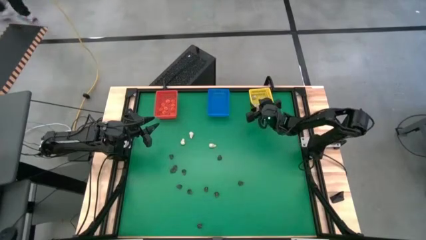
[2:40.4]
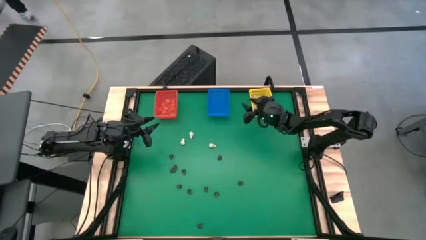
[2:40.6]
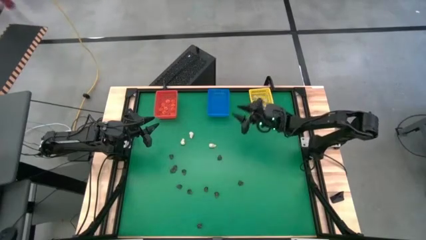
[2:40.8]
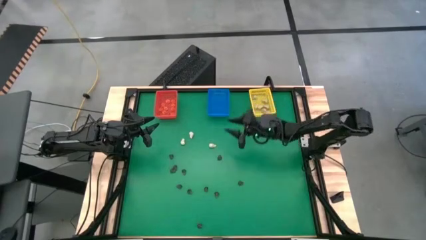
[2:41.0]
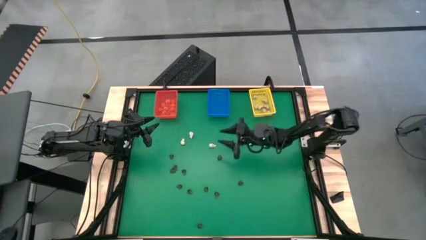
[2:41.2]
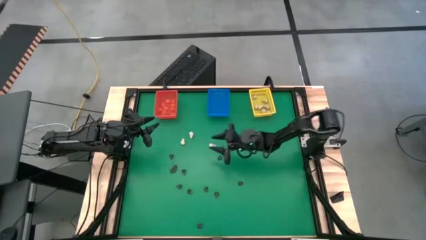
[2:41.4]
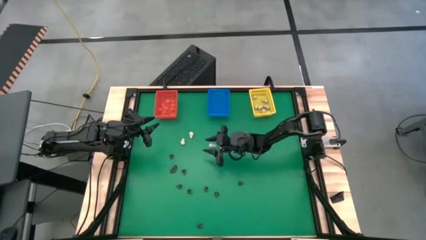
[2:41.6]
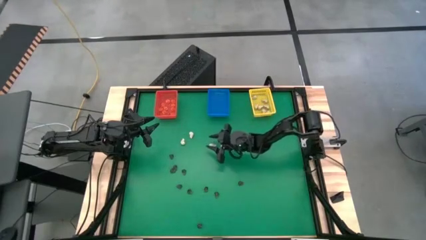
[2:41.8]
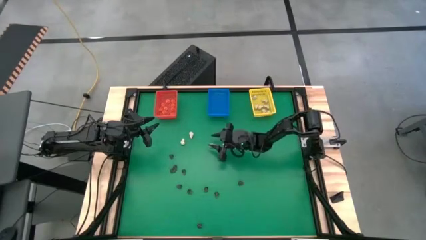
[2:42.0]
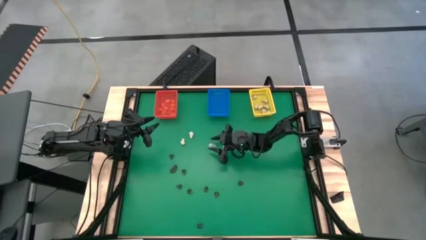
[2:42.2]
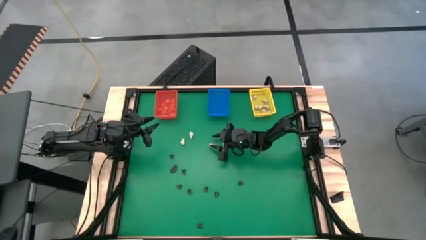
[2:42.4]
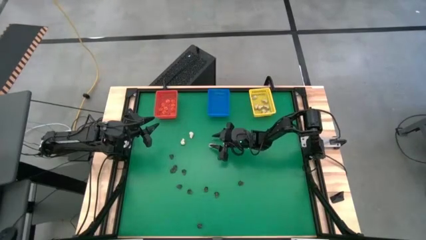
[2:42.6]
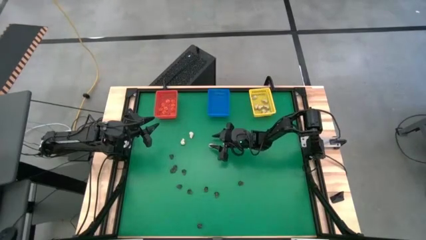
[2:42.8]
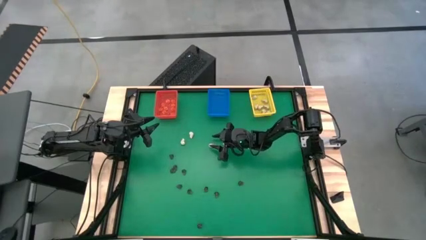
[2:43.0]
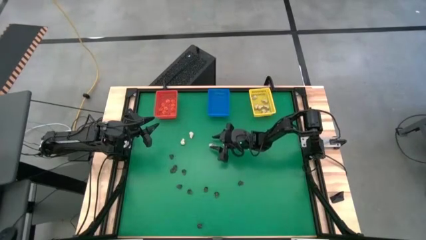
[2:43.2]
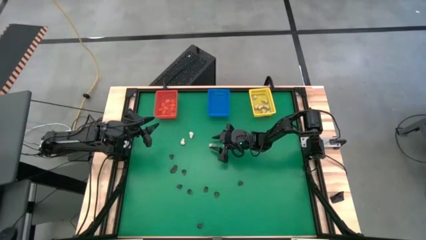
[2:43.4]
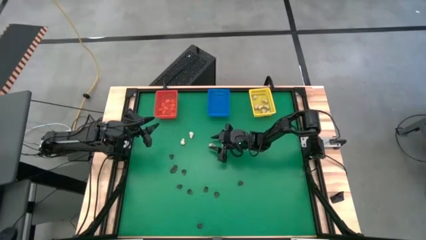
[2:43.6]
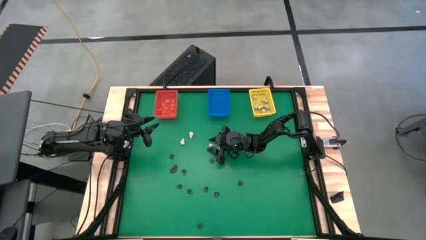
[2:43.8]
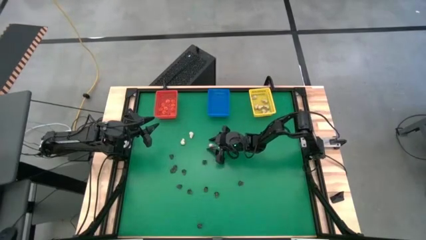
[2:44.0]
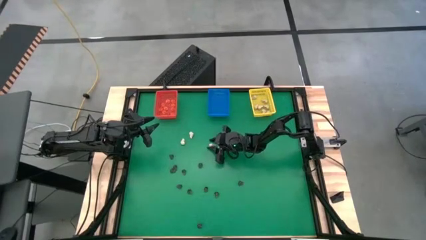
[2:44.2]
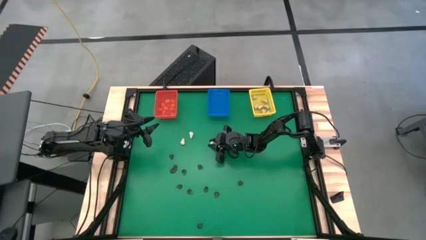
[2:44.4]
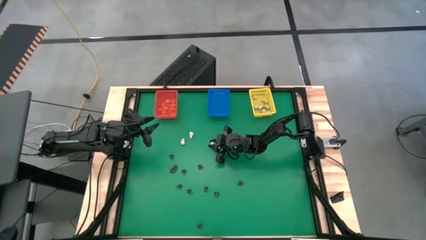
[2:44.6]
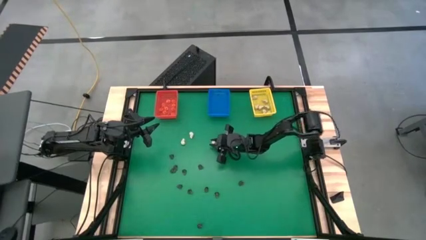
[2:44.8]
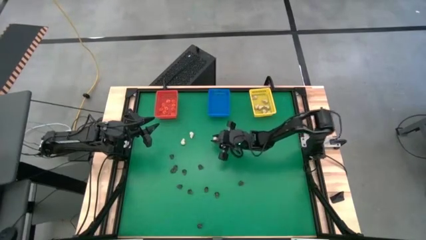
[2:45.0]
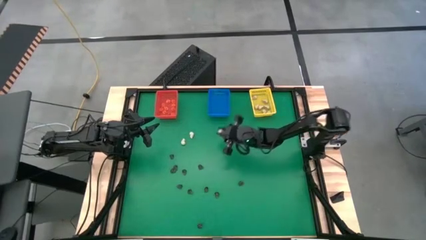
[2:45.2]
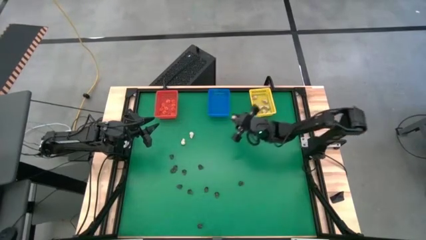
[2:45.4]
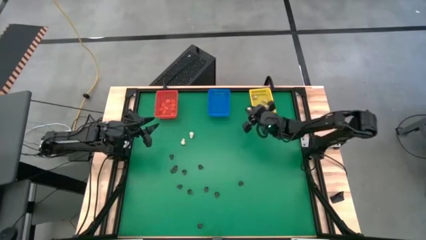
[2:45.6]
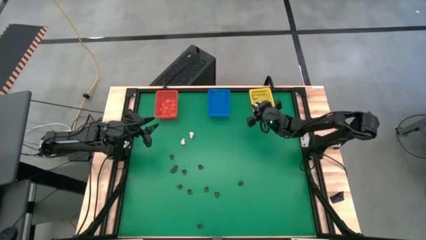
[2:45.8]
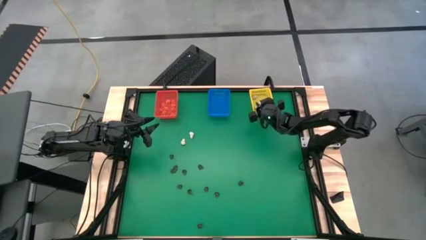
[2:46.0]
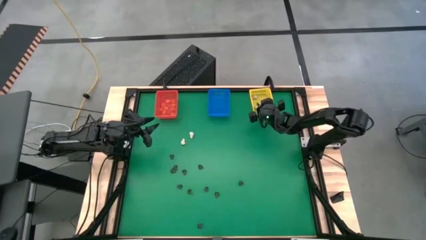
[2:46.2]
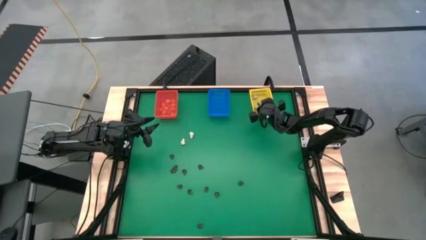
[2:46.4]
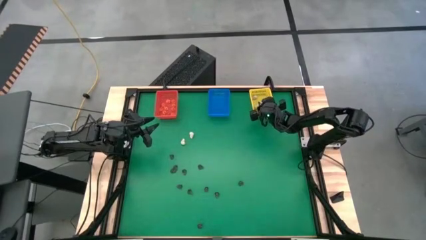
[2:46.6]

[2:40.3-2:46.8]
Task: Sort Halloween decoration
Put the white skull toy into the yellow bin

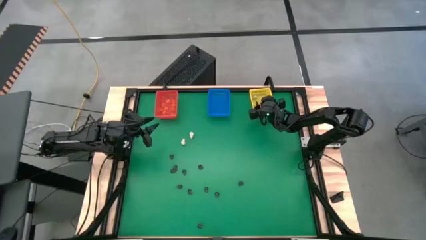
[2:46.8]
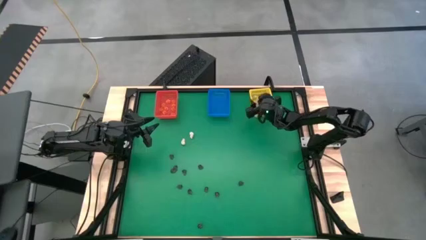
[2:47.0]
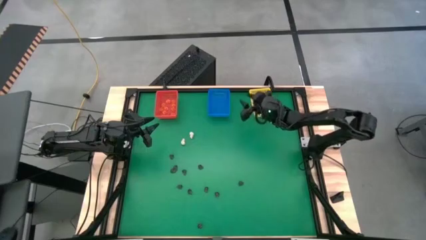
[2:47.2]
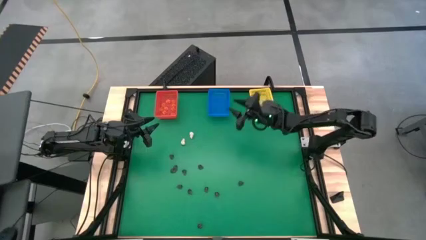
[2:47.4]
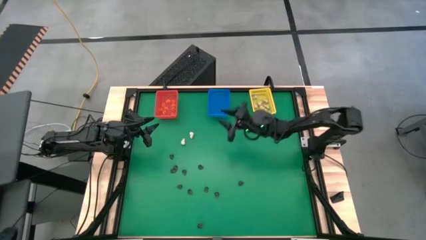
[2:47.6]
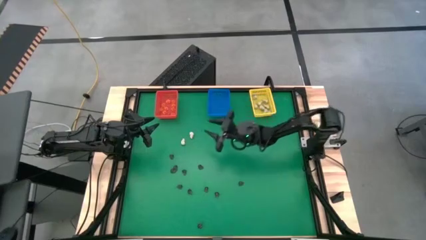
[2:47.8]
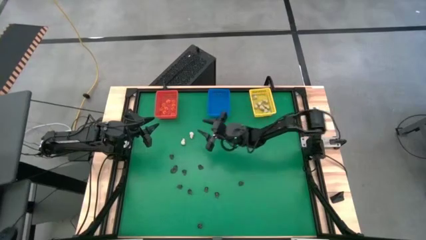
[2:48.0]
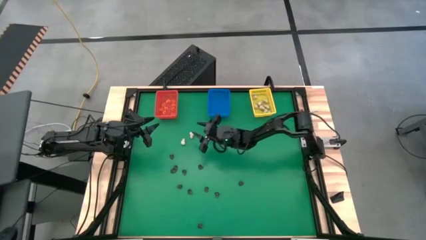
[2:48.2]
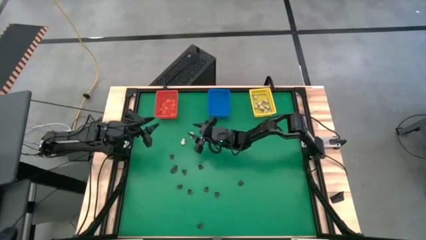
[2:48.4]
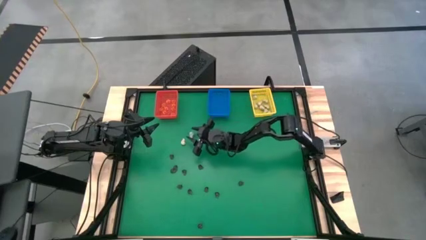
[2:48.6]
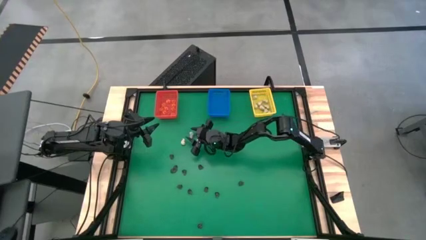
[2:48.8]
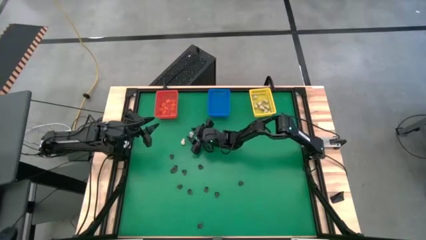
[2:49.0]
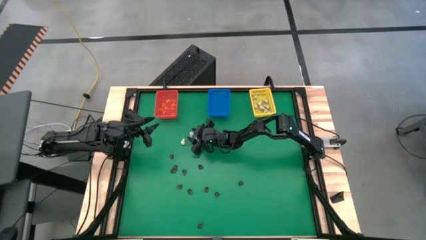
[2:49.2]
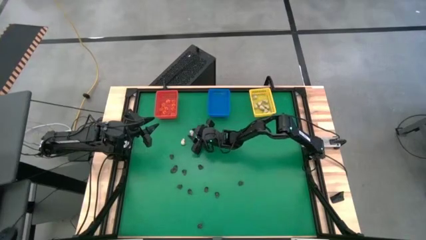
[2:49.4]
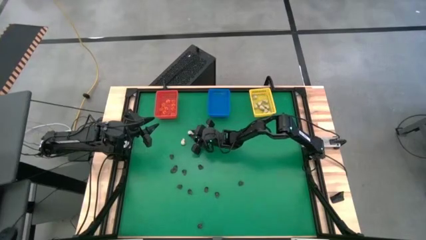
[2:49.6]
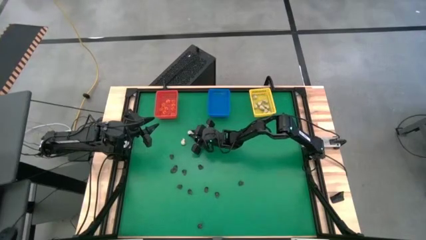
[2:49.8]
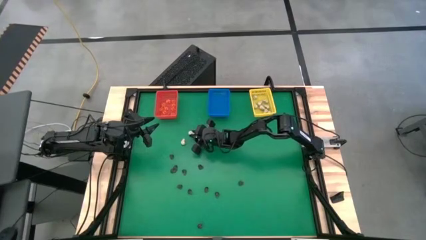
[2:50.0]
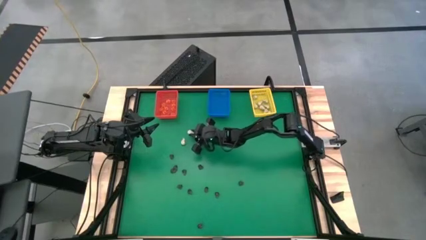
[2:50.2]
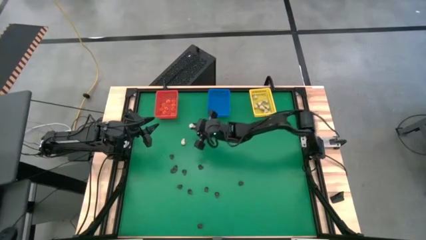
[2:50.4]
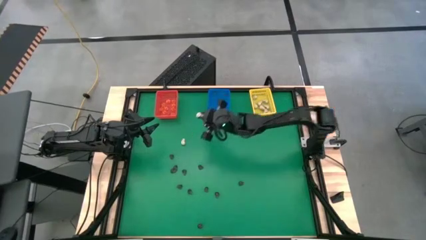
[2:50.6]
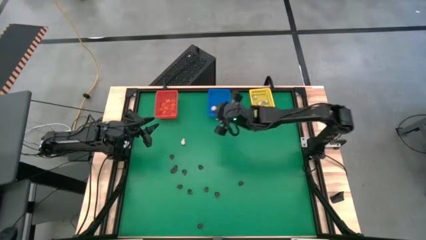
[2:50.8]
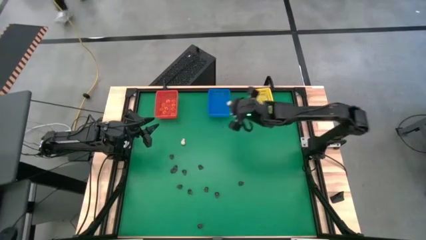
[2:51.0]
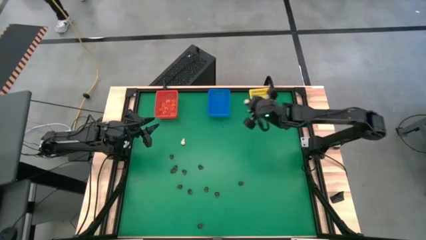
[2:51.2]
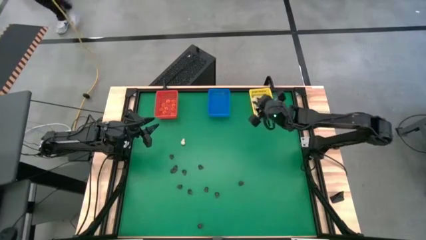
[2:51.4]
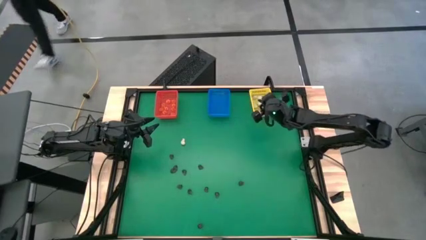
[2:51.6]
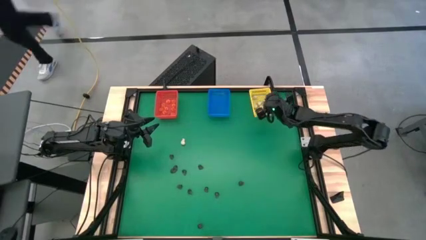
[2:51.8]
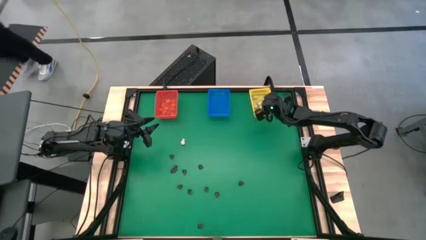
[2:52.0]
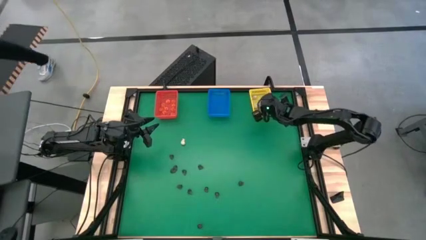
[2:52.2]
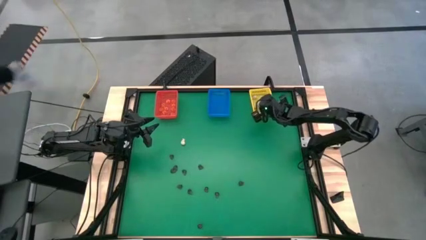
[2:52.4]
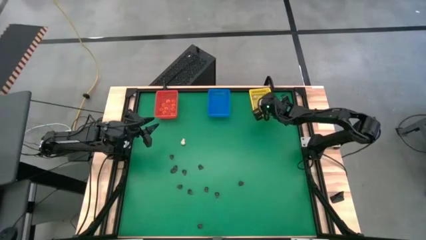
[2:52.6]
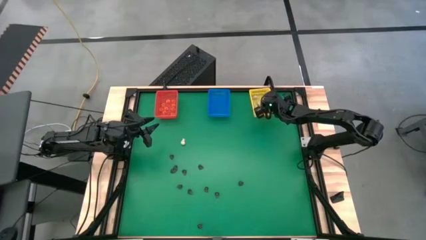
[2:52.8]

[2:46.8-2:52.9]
Put the white skull toy into the yellow bin

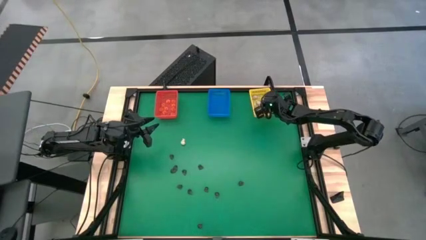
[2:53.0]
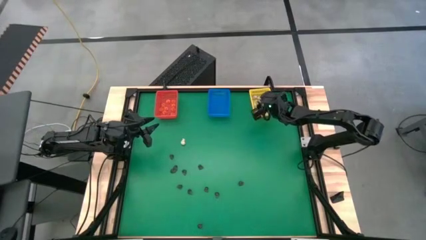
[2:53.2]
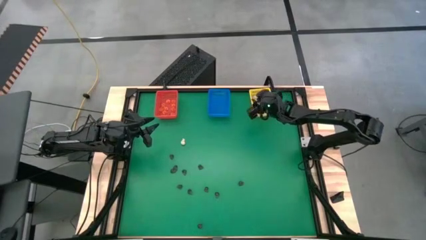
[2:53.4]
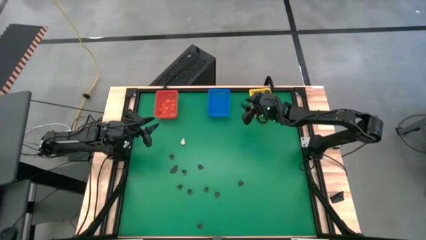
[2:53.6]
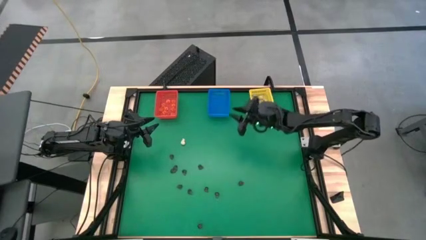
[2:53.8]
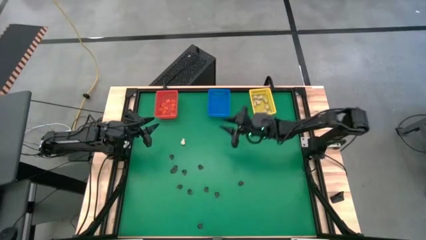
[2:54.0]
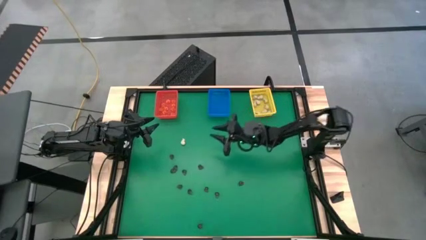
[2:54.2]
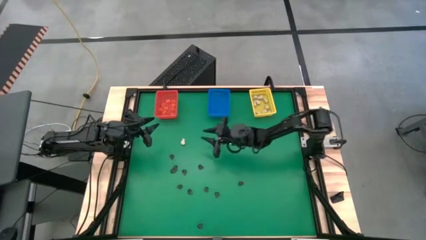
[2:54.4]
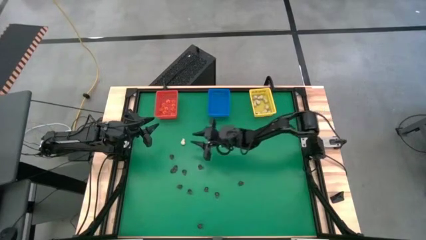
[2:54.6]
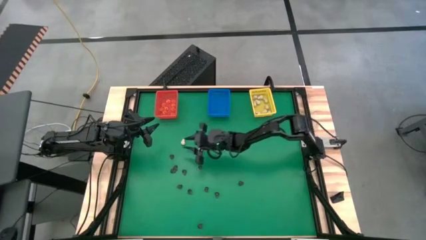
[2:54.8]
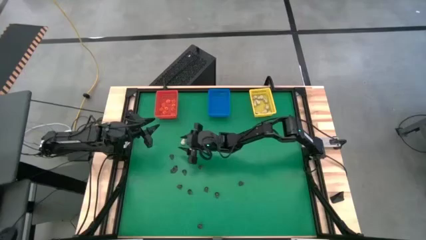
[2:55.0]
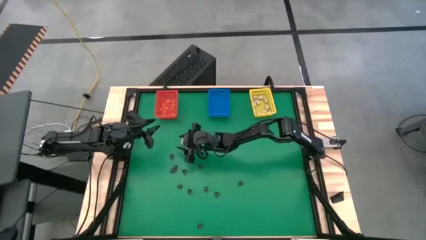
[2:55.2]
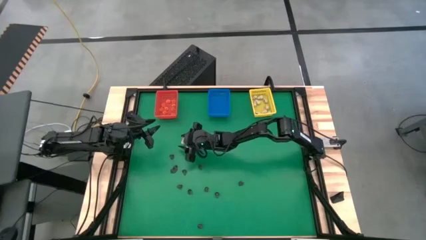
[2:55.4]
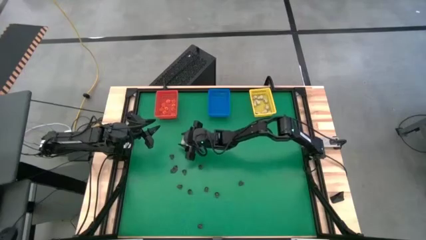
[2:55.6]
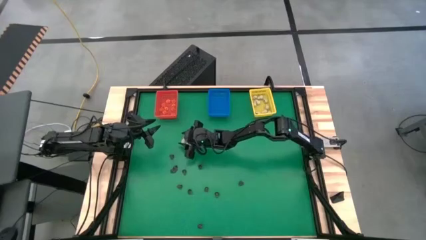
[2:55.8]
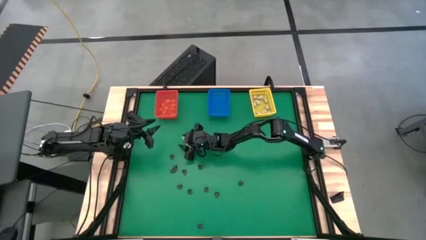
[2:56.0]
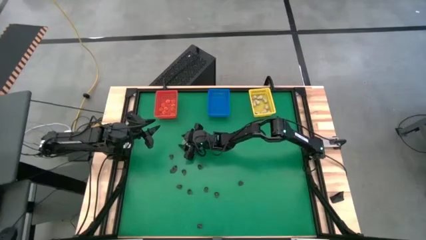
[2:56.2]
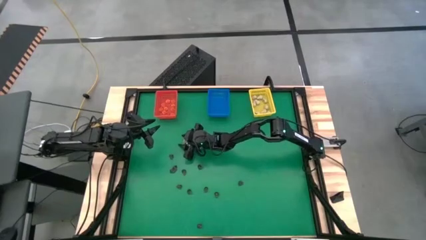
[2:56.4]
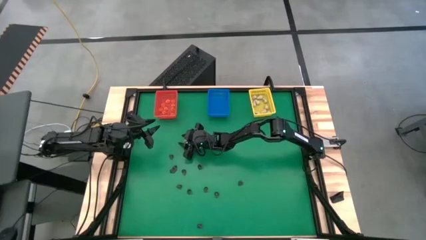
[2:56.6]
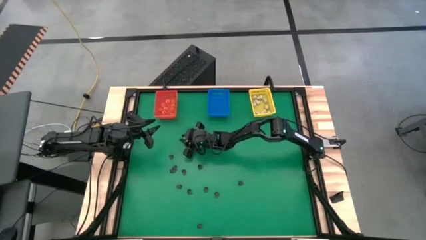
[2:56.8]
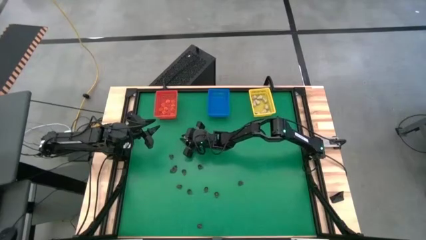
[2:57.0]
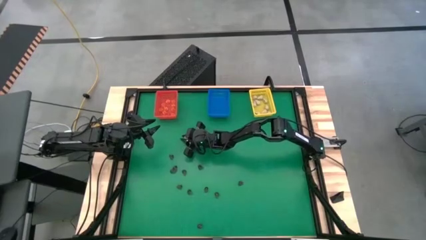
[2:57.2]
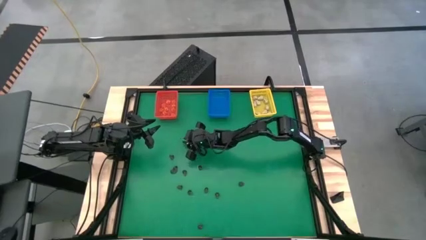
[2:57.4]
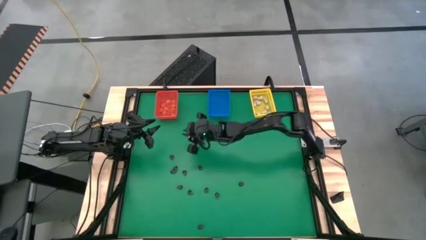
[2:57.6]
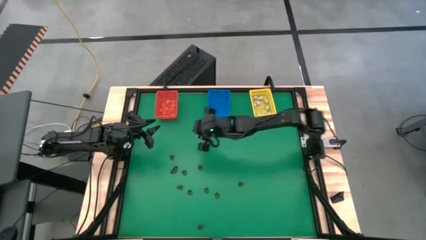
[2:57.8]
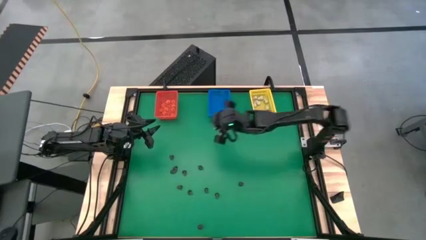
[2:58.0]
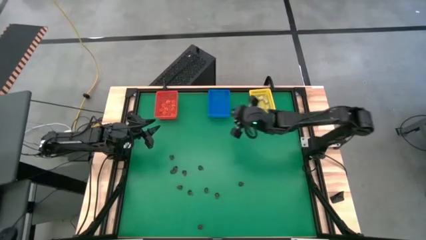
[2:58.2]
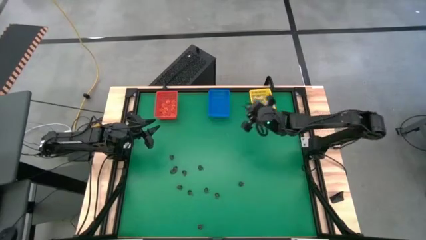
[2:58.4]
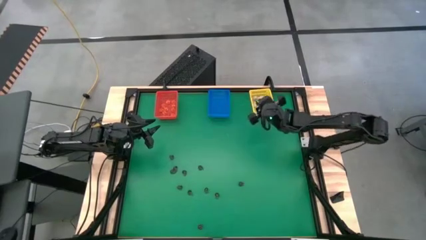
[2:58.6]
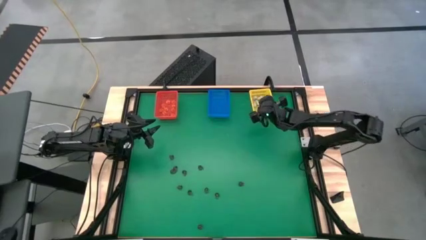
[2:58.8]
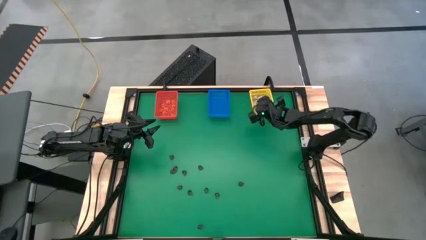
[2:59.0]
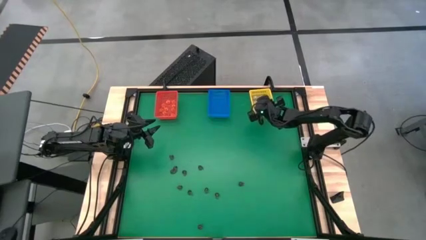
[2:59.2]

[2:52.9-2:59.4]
Put the white skull toy into the yellow bin
